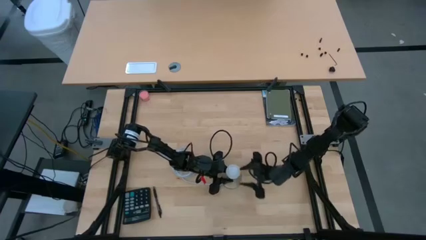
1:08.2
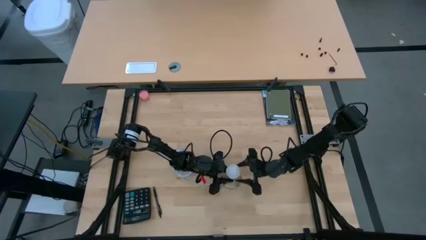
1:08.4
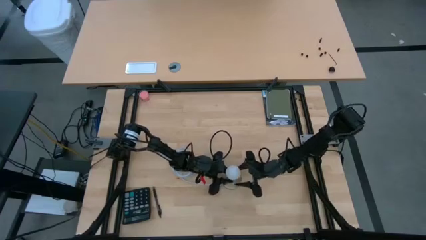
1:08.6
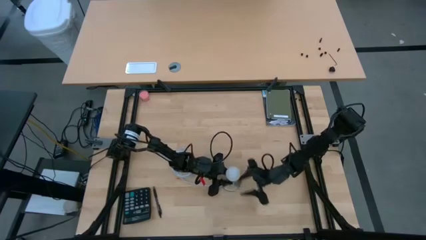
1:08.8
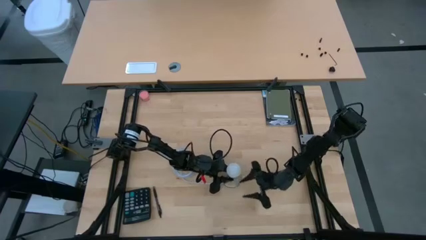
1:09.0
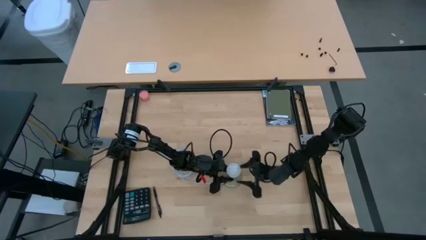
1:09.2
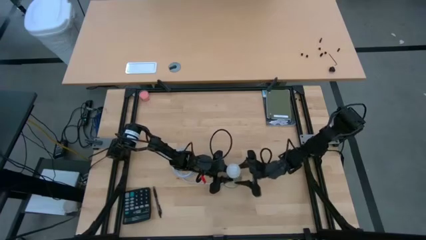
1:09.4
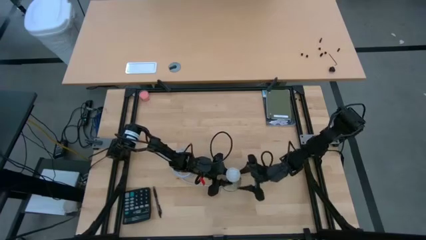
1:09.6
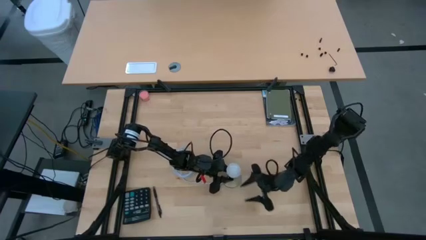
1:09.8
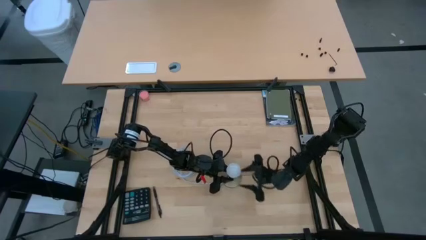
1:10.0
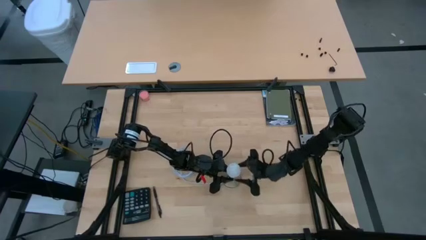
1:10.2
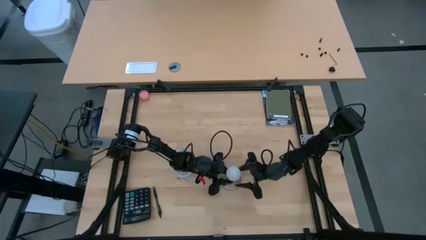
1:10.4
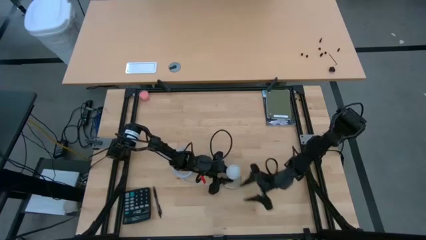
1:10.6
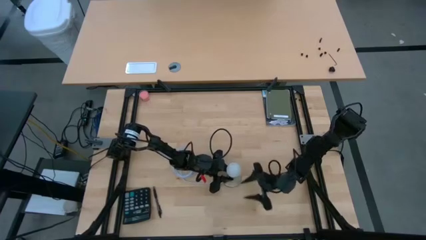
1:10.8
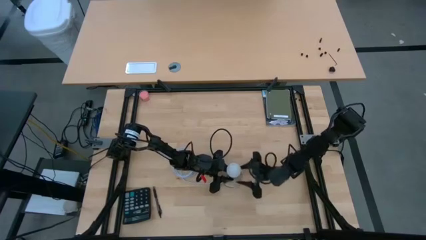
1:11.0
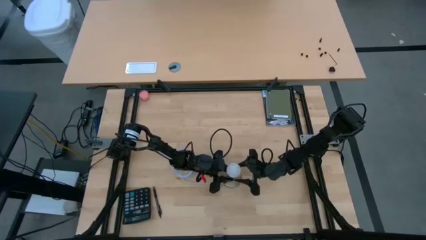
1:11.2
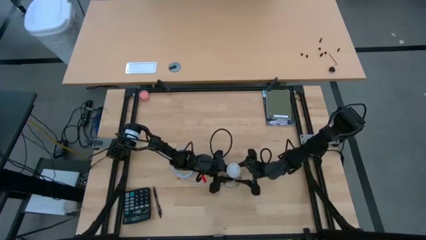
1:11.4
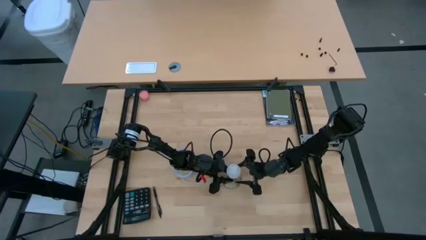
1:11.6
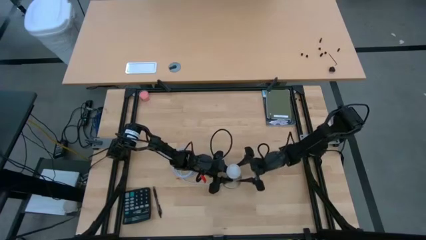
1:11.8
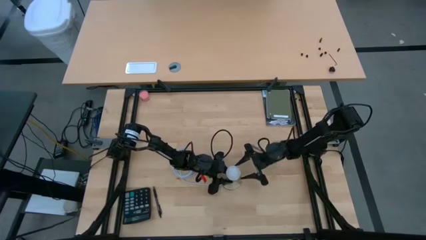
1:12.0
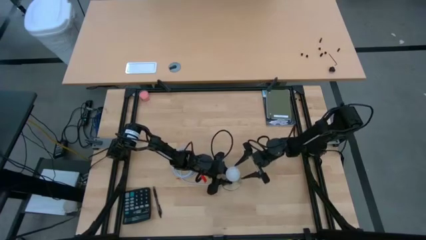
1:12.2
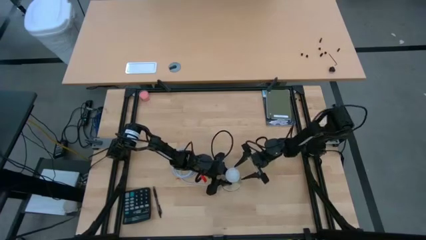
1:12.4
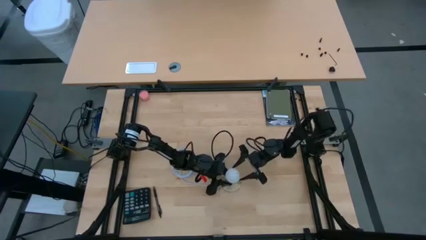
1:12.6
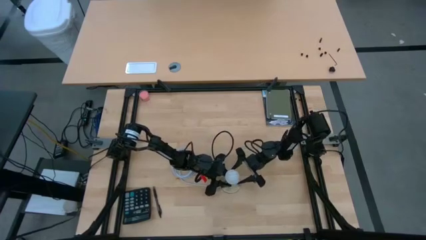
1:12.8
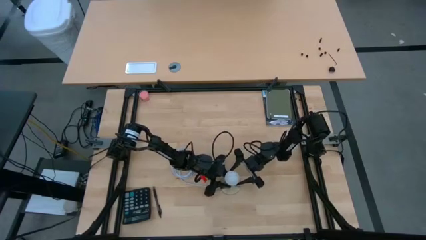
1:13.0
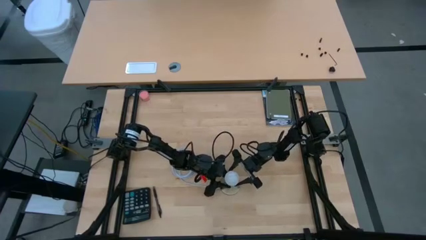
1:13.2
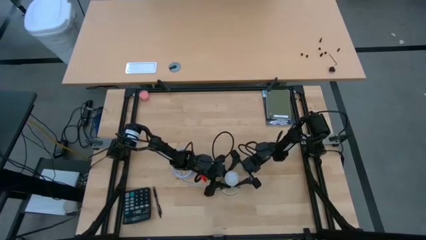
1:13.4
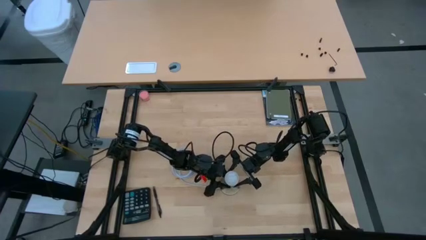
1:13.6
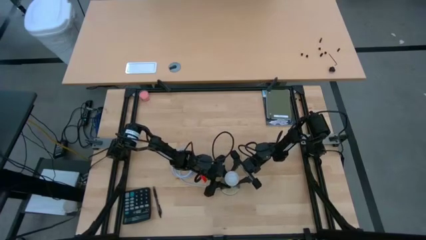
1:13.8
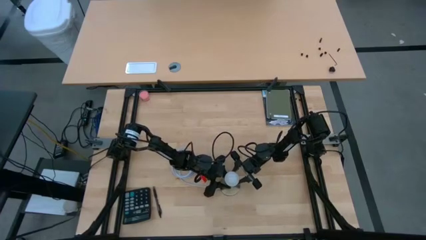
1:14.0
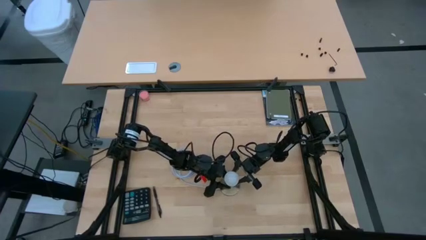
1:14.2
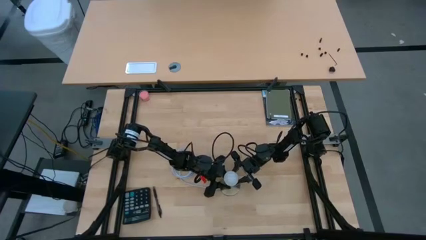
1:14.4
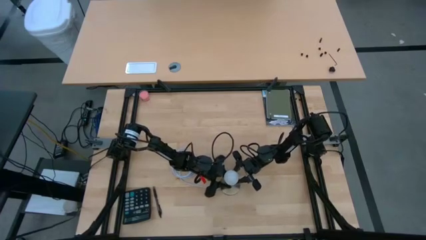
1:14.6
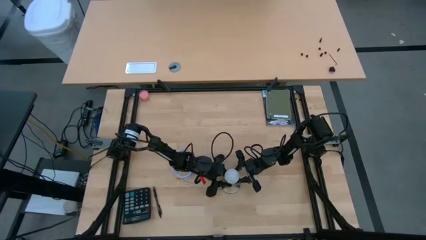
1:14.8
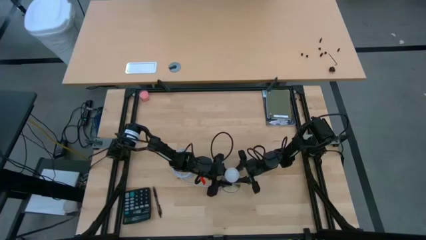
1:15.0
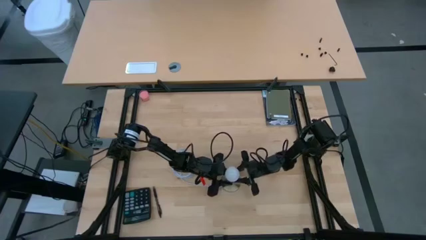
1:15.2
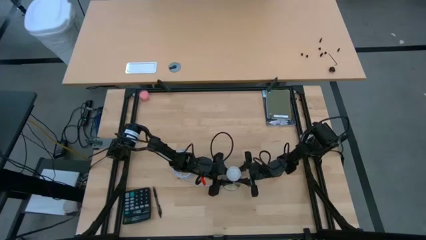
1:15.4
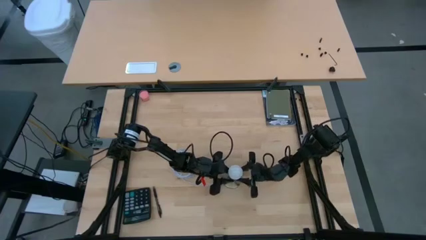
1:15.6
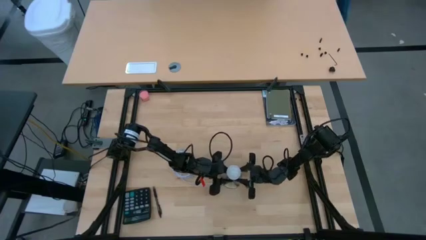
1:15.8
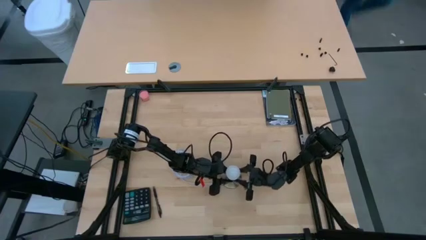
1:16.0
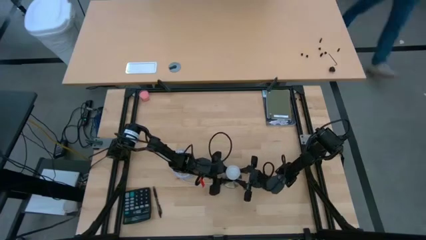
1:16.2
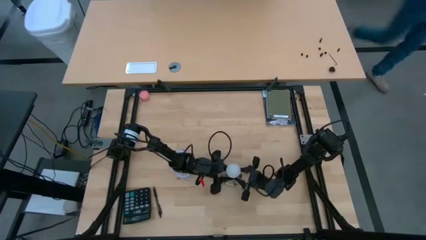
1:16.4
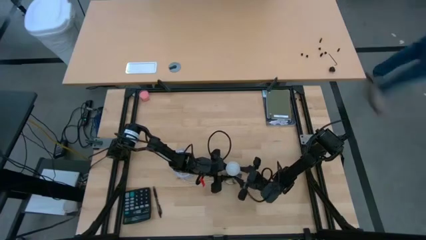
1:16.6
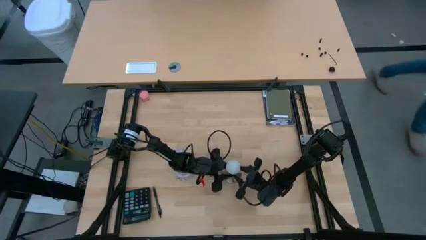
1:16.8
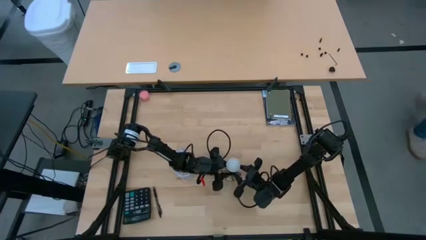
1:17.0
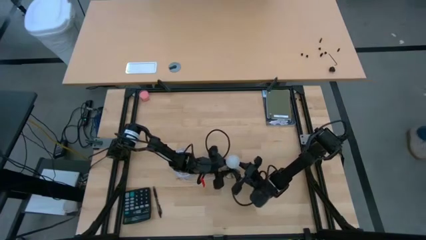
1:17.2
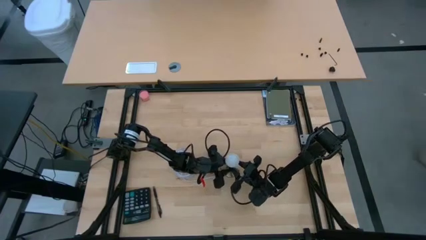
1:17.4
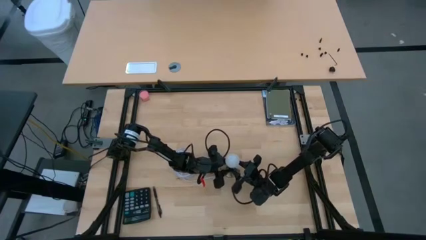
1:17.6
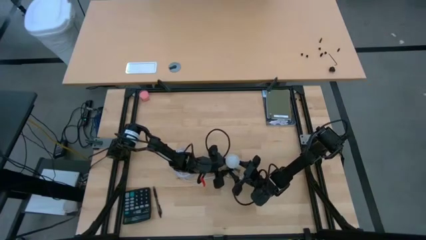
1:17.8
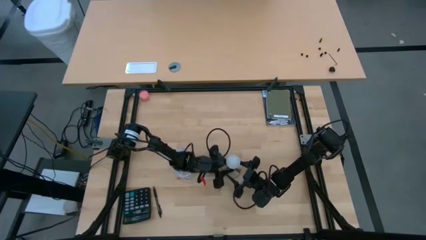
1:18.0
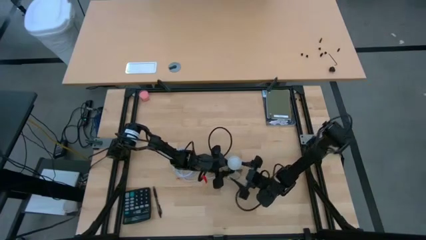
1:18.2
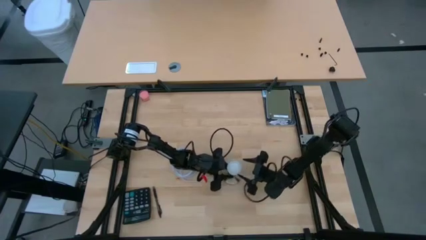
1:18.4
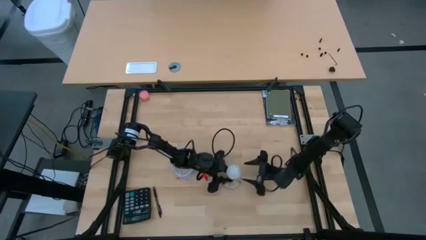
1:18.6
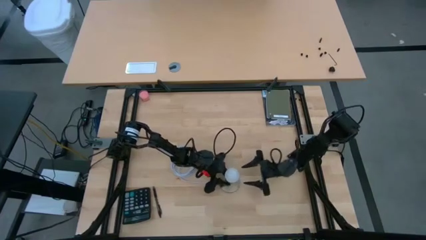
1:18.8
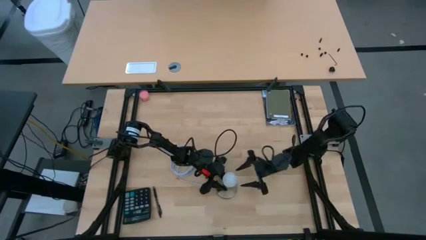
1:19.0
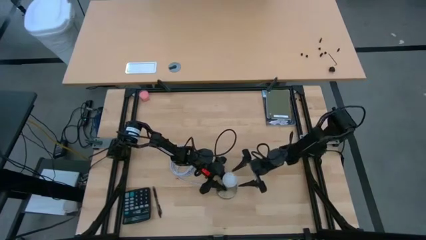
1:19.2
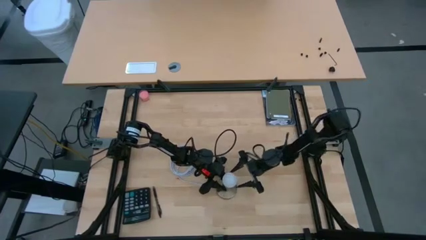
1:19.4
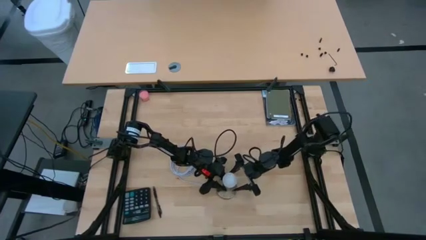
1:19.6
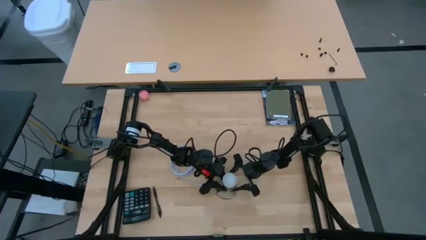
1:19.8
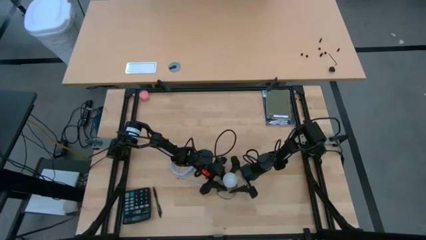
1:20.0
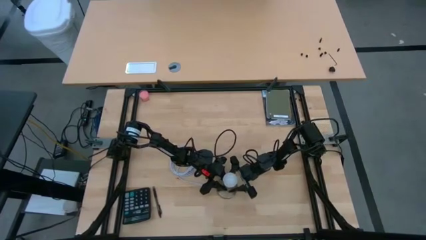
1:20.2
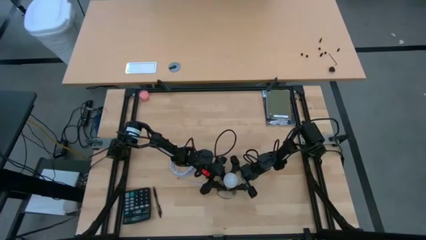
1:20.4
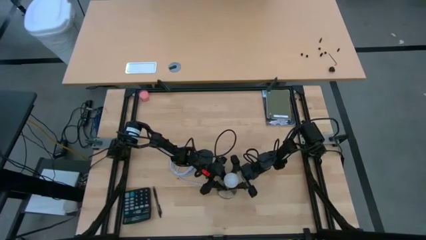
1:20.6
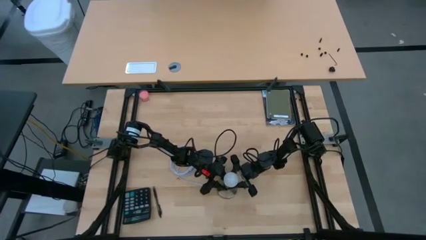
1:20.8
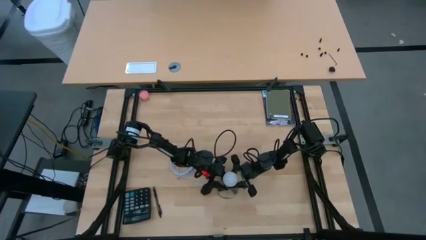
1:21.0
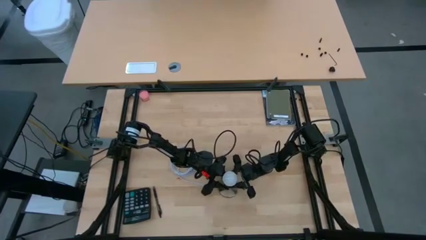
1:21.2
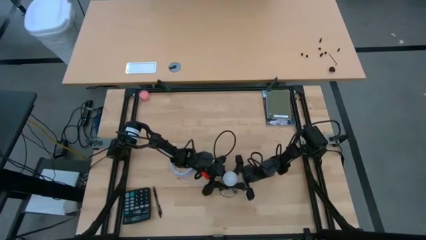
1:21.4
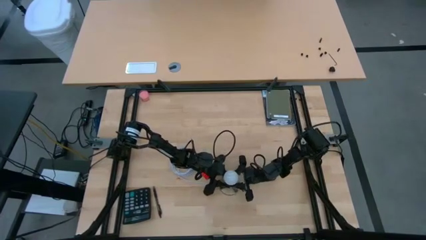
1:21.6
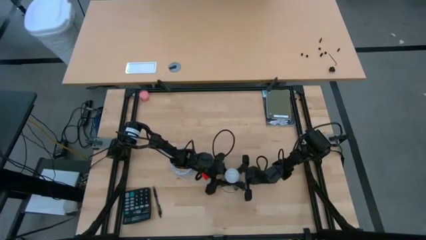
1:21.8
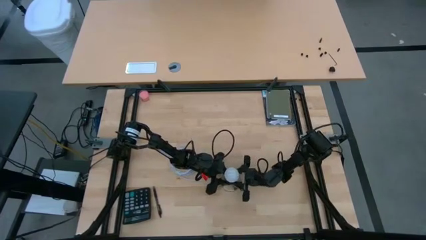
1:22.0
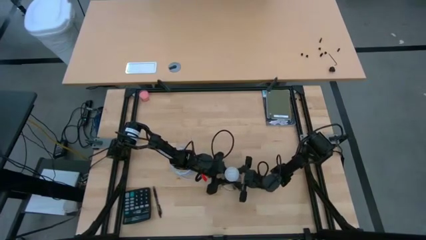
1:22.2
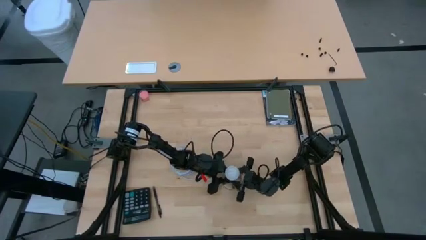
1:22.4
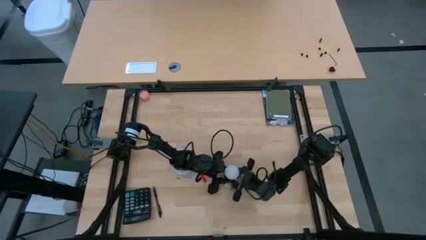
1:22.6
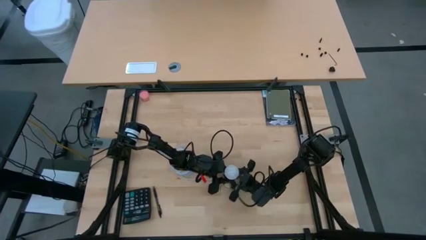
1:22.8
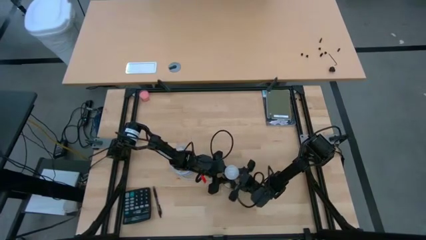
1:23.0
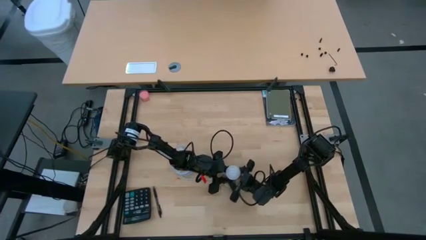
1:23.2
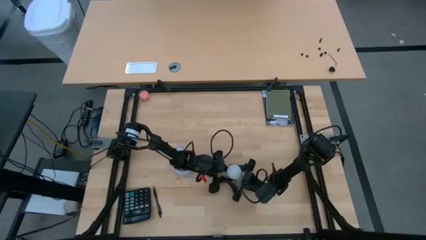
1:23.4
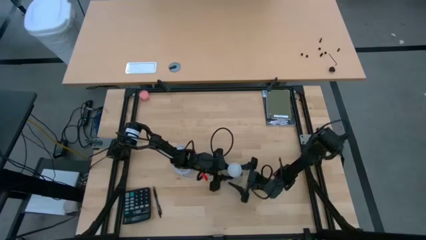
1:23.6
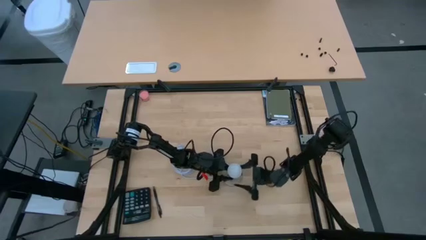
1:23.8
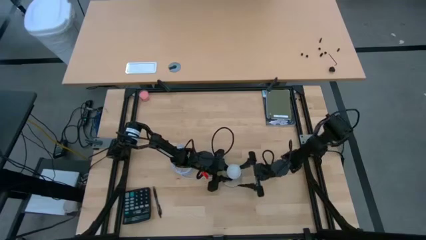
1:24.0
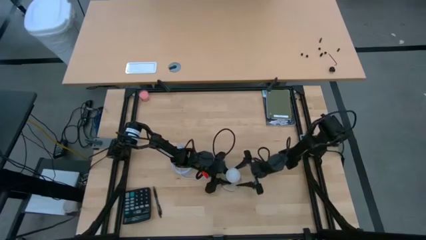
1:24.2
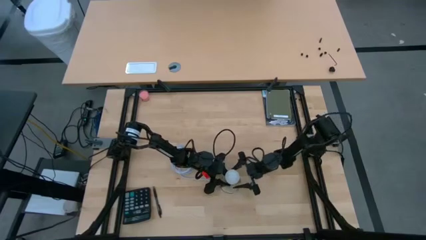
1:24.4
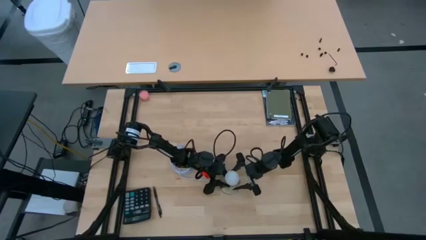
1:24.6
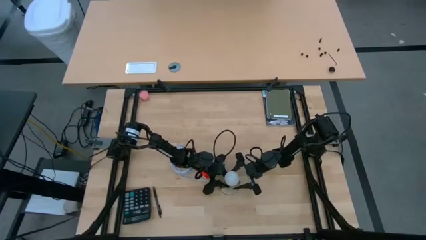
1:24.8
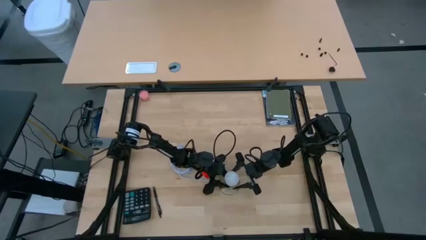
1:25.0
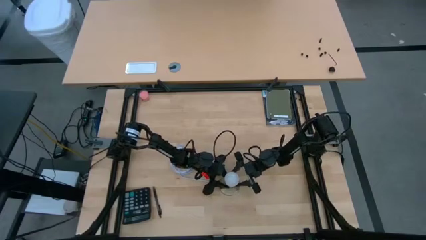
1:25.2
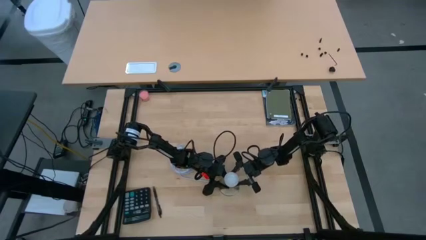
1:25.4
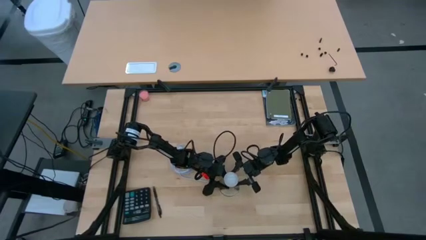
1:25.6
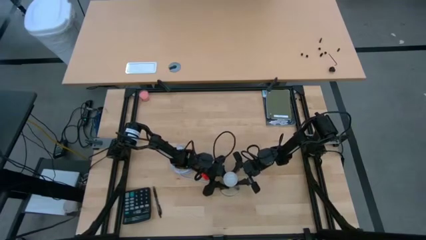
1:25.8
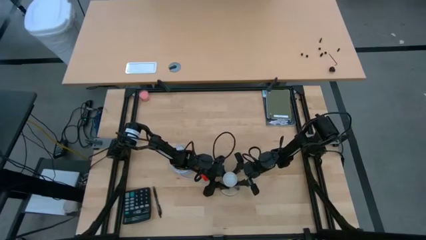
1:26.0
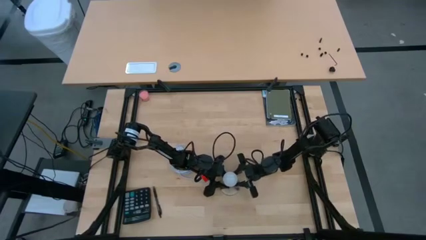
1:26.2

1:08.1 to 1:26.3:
Task: Screw lightbulb
Insert the lightbulb into the lamp
